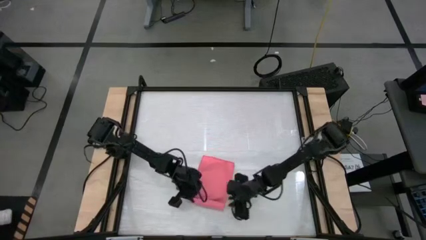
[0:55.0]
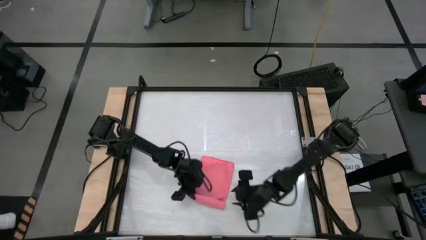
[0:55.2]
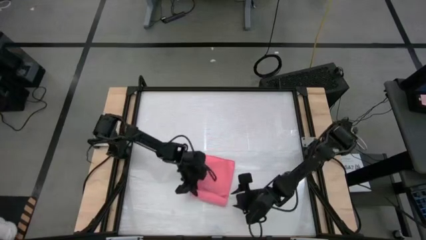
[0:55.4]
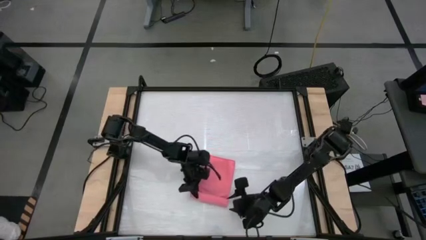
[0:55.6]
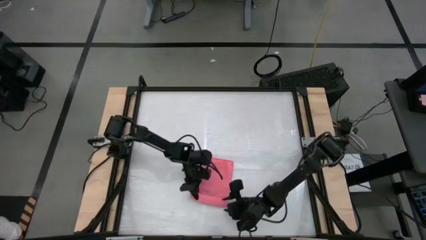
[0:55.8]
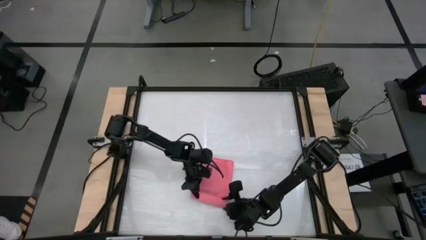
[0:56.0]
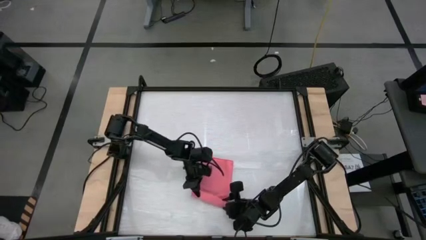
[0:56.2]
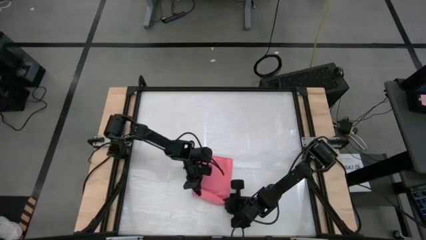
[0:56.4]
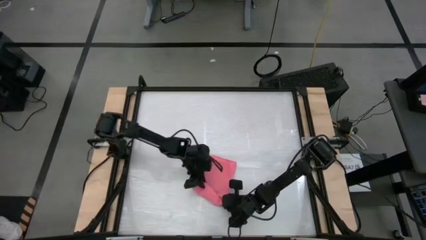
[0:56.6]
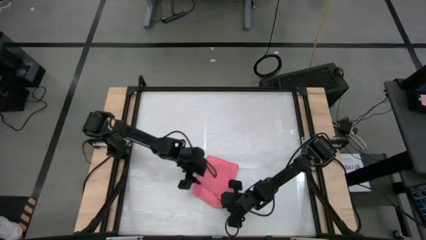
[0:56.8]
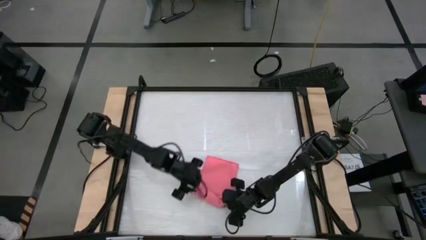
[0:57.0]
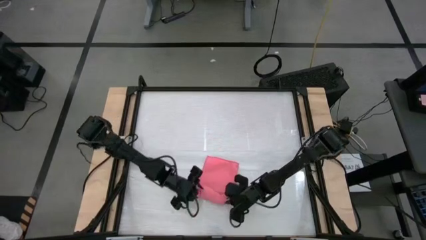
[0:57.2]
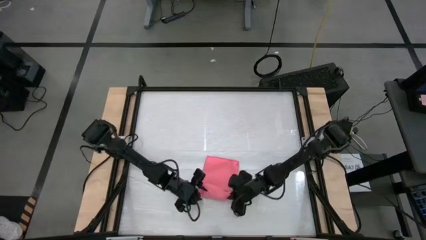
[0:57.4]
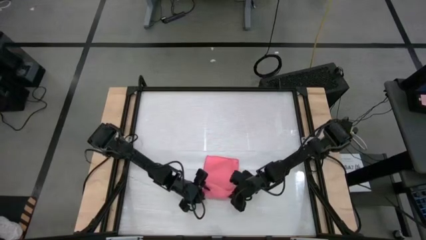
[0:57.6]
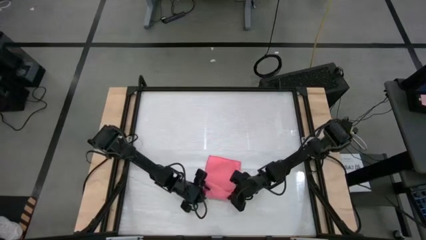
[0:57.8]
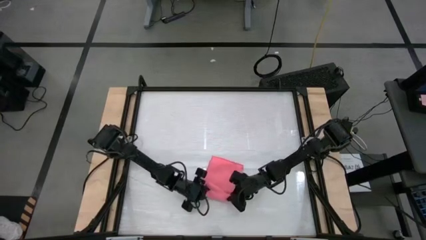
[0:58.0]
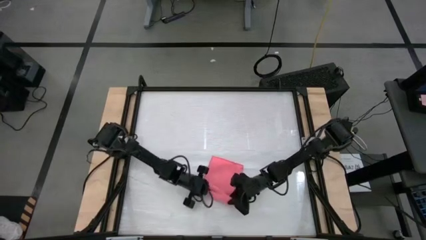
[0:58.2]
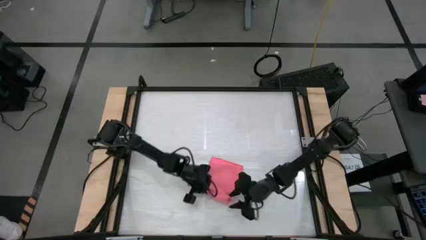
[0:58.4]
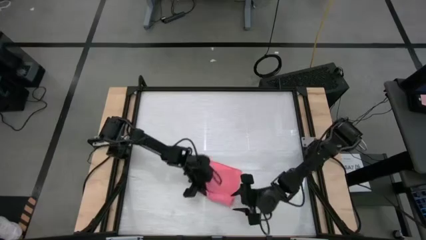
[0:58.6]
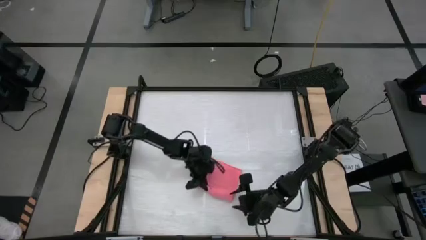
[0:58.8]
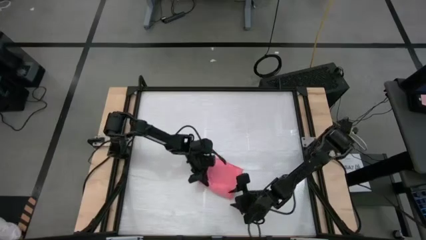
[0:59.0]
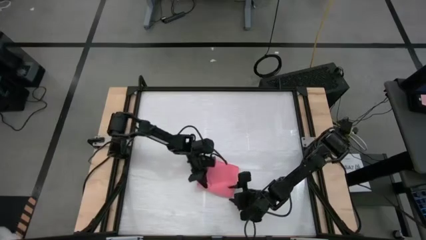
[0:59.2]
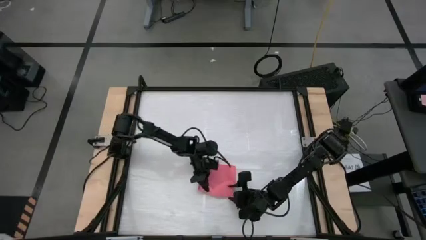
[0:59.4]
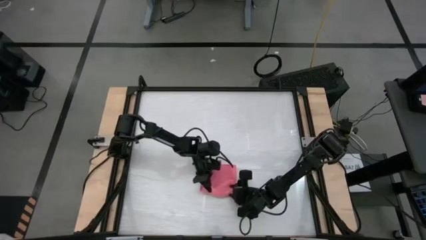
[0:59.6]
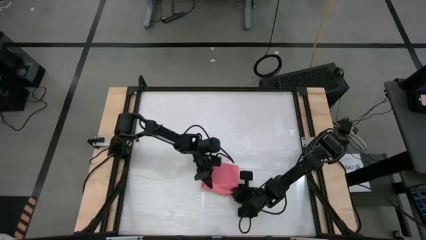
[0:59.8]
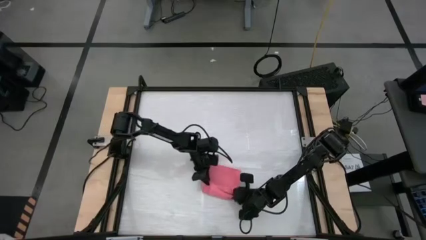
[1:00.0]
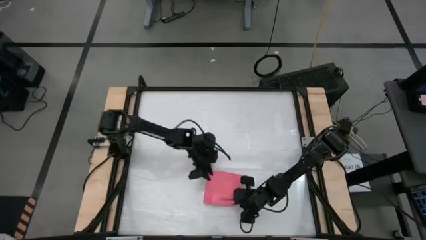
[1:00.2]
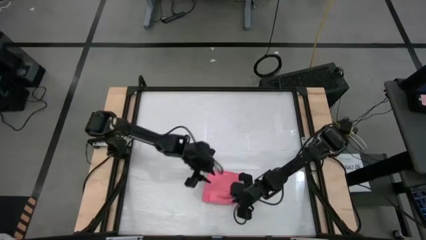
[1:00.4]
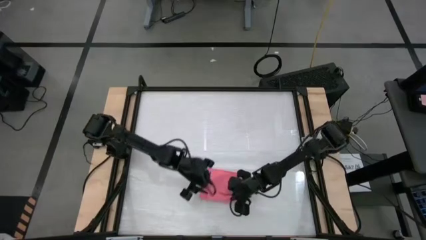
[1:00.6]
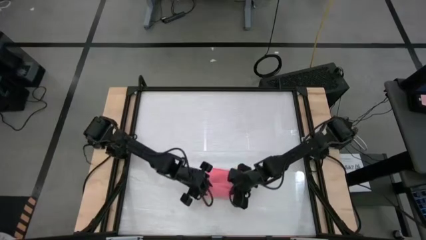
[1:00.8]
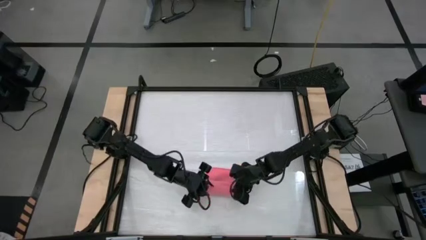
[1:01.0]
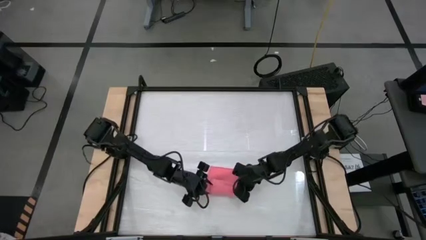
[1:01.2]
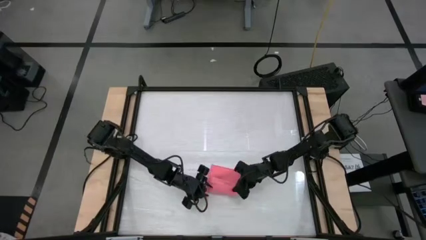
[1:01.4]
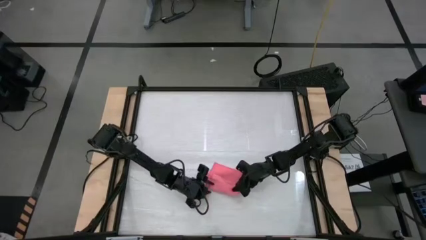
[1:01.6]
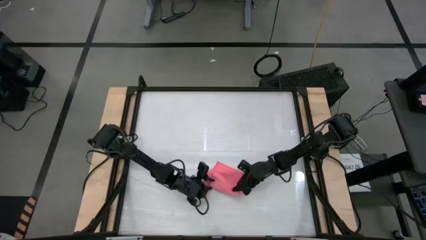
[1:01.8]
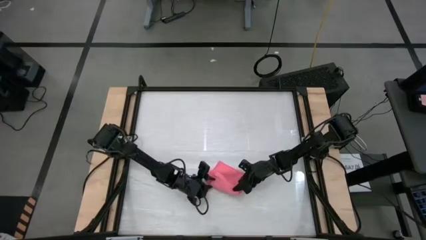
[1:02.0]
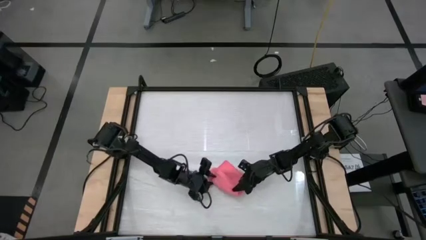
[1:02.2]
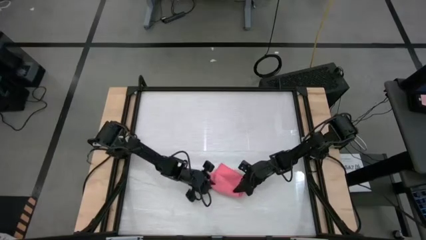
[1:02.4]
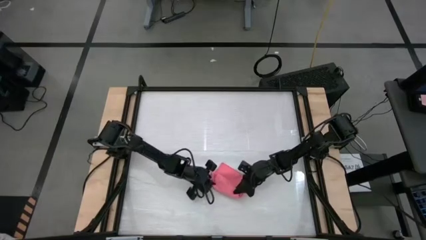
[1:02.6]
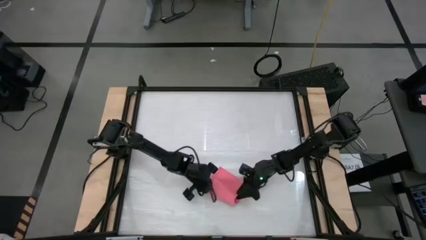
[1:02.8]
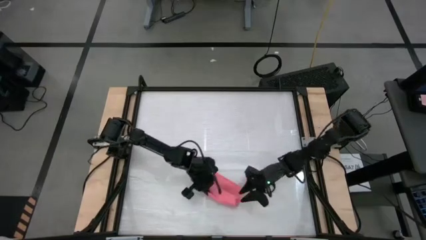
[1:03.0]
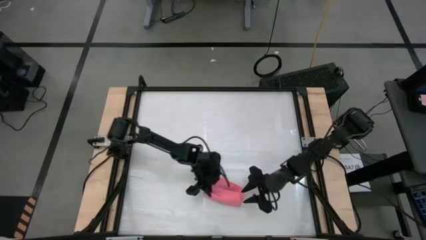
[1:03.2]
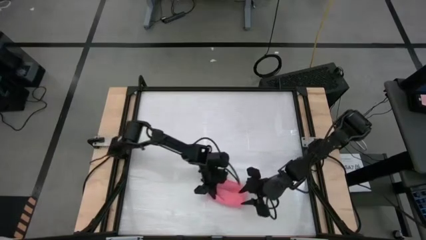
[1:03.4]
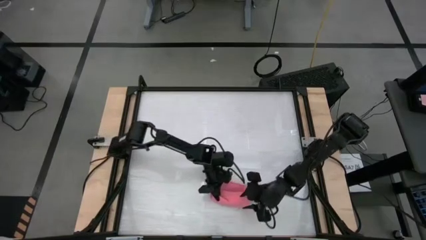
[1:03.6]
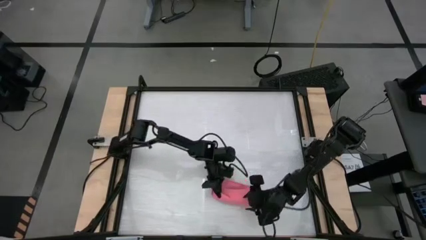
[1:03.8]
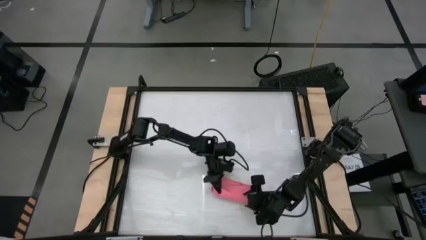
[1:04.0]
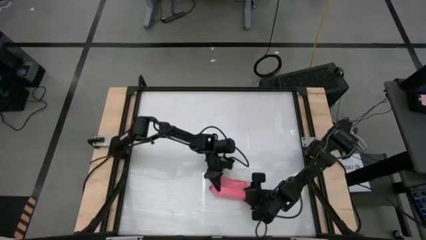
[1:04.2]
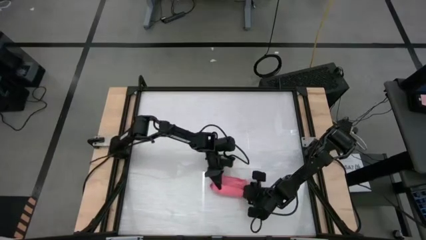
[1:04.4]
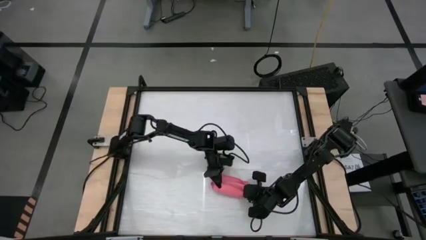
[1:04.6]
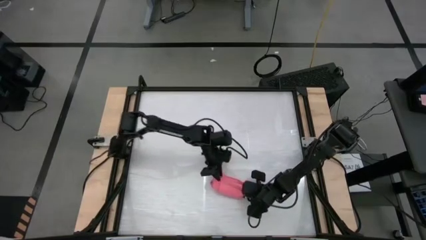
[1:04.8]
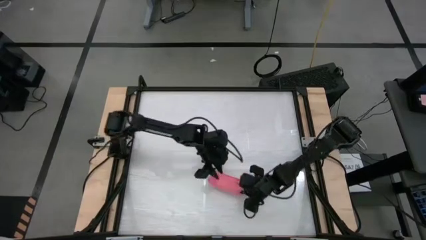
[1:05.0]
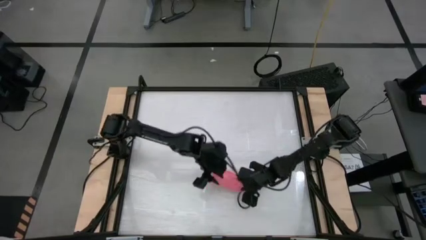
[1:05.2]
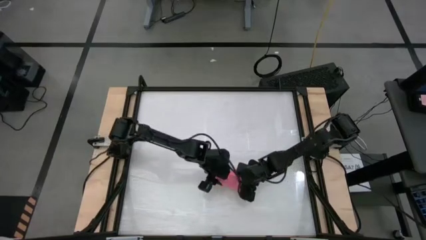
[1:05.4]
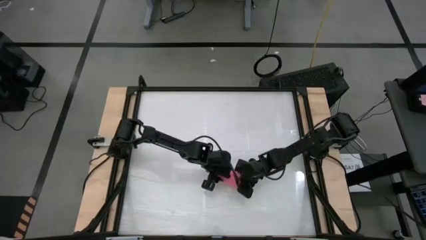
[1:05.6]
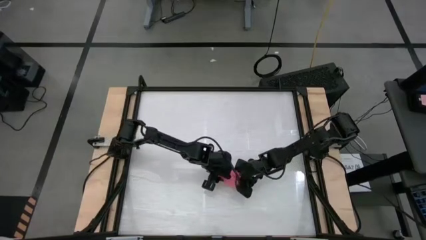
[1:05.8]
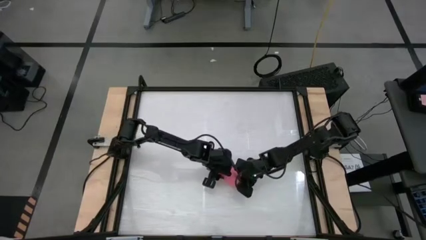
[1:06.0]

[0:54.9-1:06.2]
Task: Roll towel
Roll the pink towel

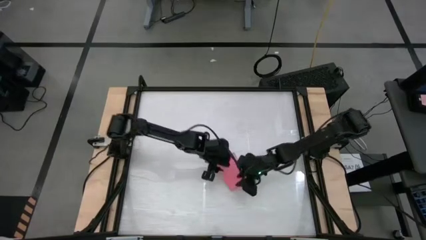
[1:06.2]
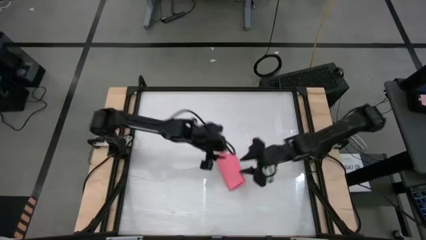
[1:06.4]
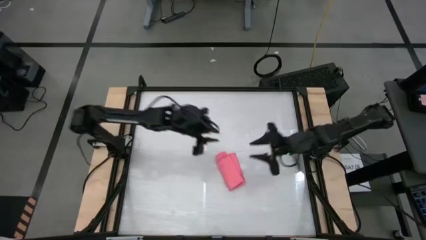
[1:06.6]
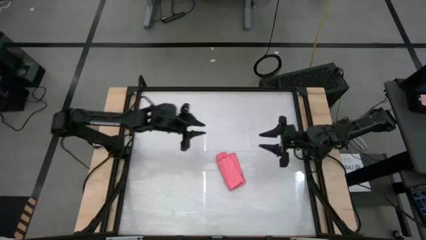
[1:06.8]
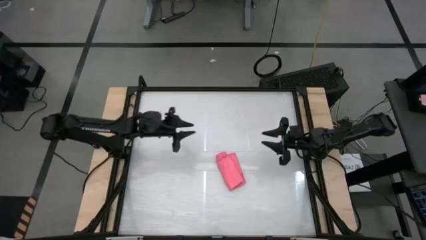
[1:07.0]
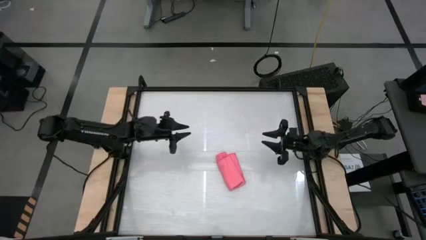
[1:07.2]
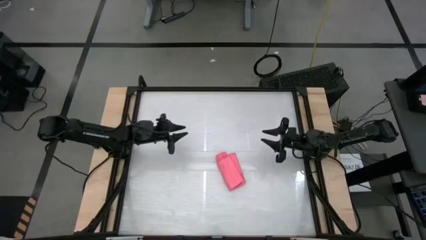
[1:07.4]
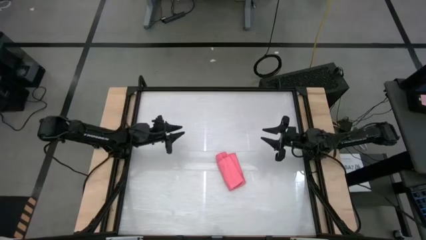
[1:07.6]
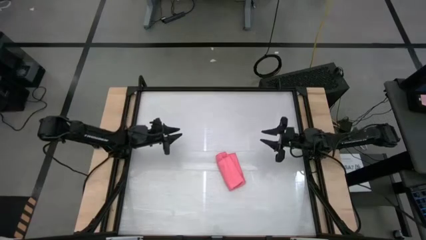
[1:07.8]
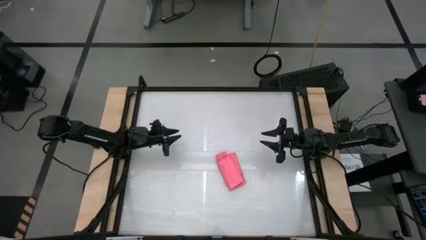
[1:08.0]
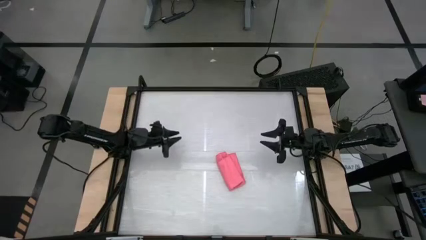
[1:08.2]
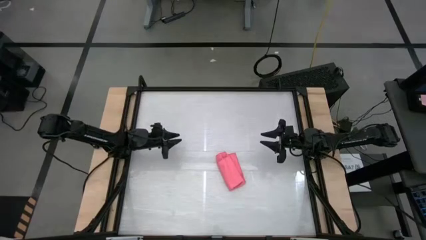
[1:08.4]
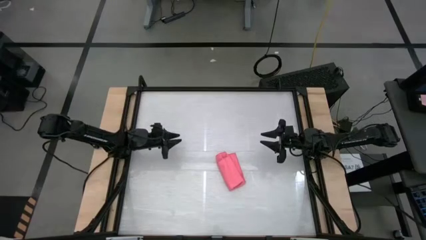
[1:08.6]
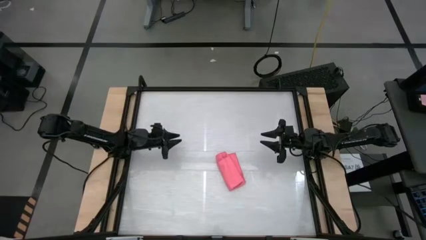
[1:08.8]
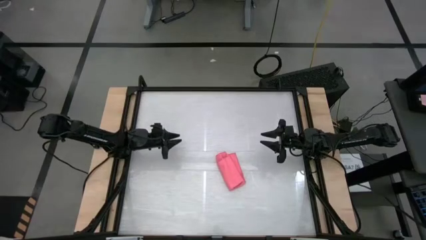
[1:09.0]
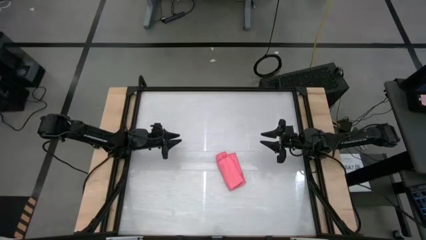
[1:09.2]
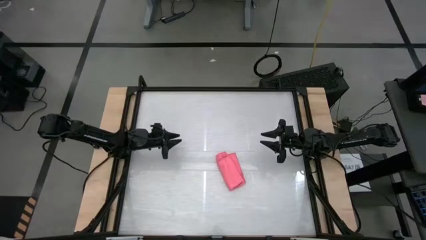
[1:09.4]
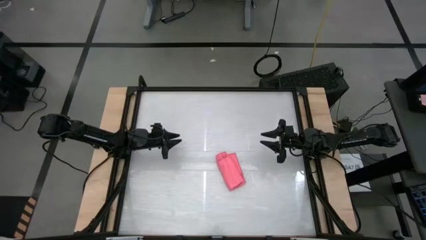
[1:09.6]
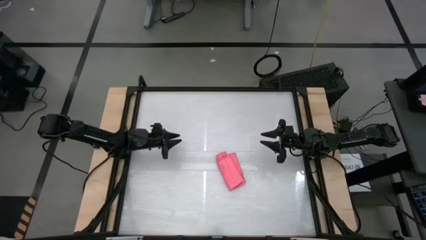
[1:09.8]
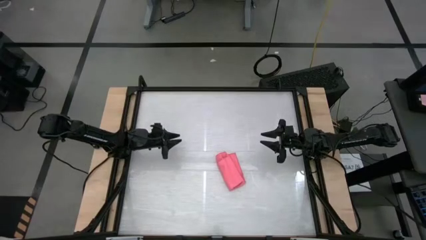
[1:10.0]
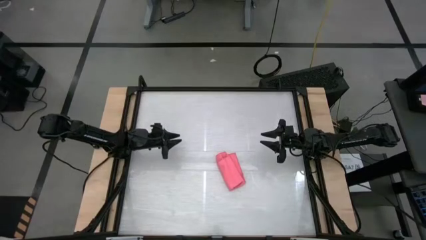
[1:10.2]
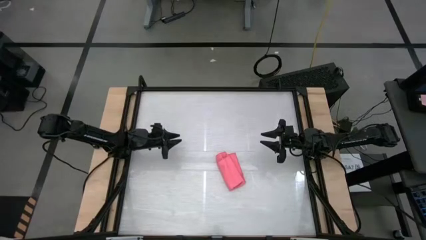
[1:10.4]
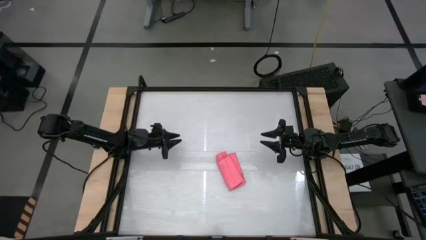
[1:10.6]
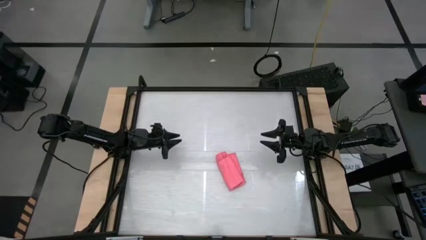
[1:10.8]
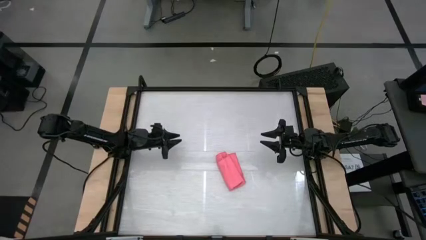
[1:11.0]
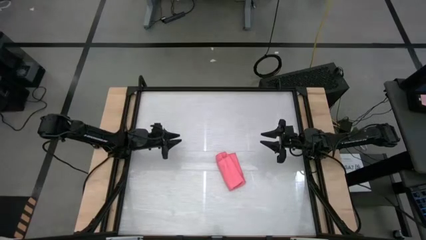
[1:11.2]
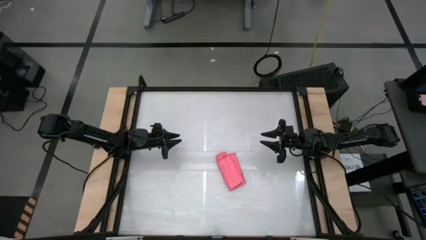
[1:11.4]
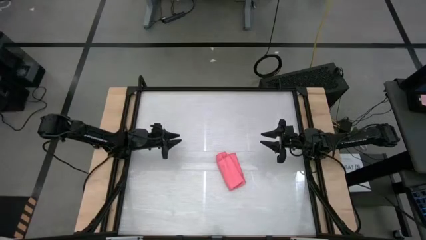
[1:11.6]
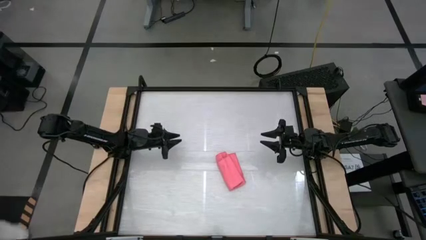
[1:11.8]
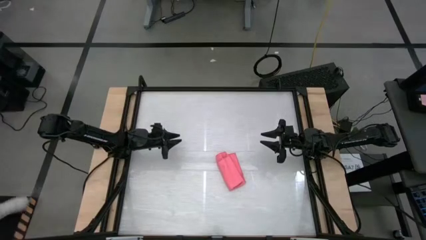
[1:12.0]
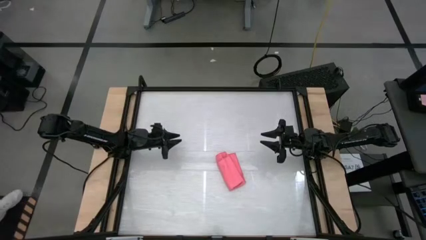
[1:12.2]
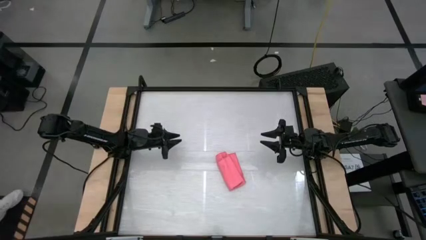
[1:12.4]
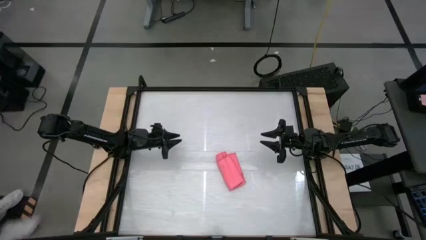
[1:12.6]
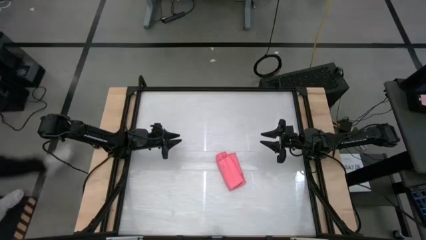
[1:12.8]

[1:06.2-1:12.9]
Return to Home Position
